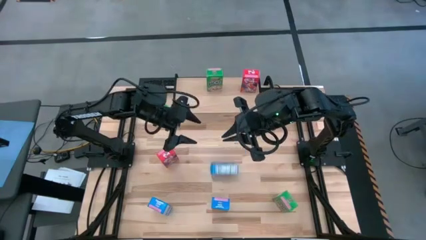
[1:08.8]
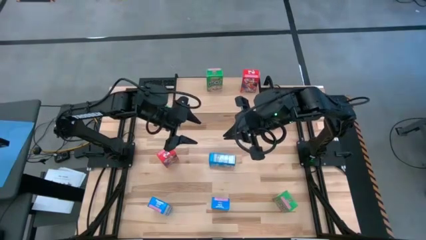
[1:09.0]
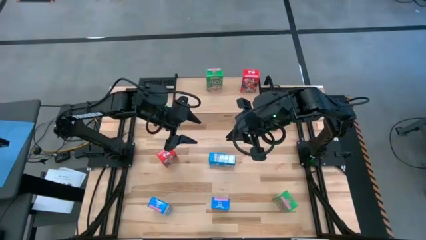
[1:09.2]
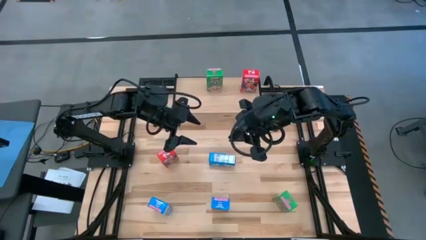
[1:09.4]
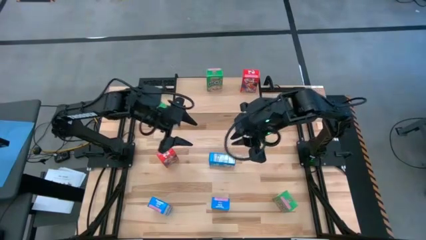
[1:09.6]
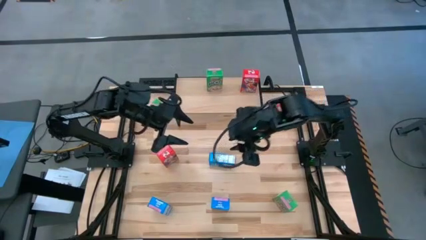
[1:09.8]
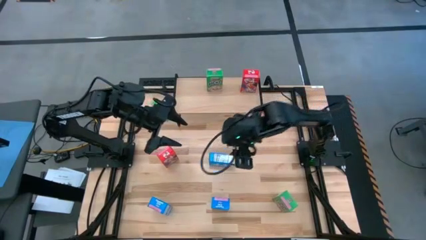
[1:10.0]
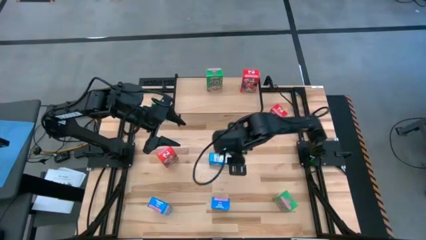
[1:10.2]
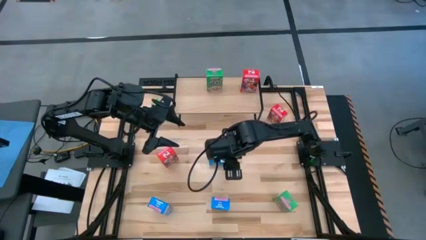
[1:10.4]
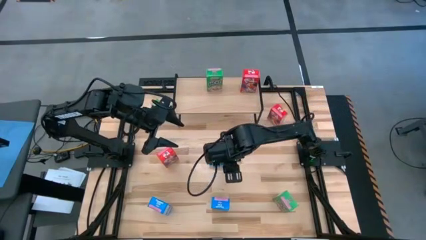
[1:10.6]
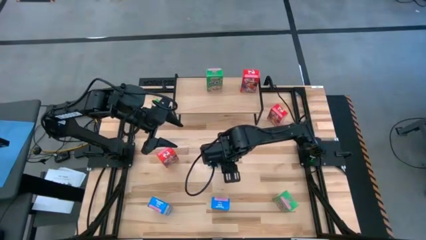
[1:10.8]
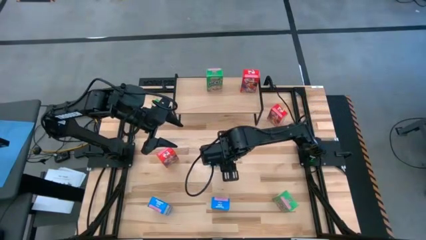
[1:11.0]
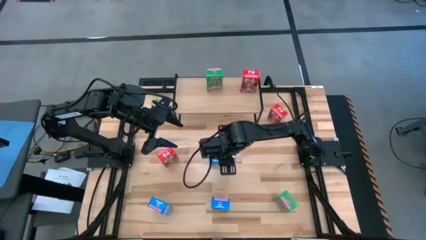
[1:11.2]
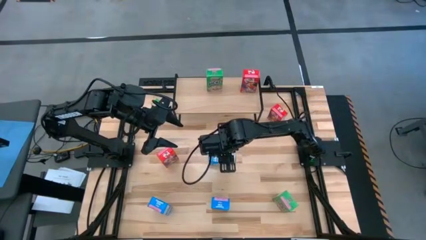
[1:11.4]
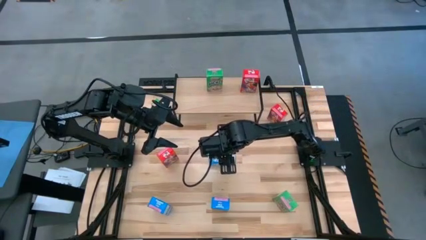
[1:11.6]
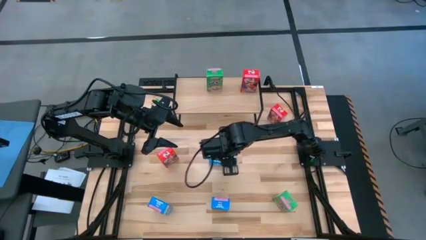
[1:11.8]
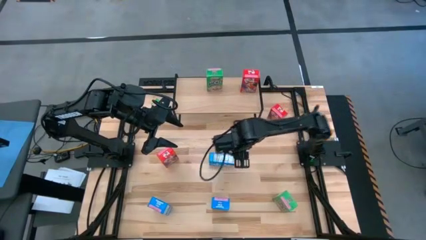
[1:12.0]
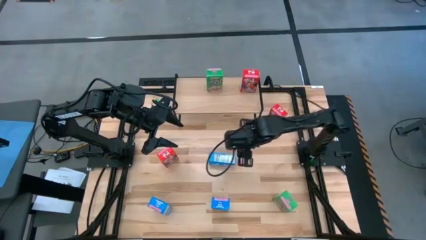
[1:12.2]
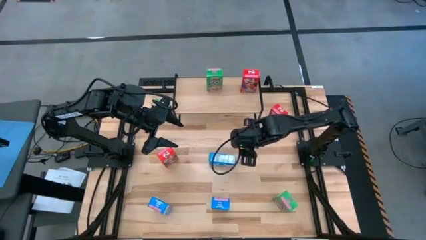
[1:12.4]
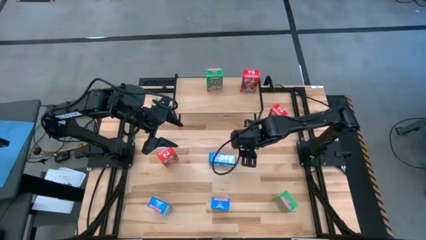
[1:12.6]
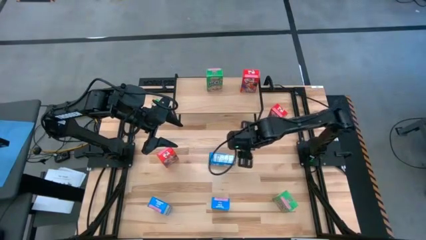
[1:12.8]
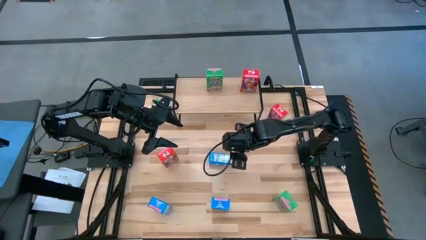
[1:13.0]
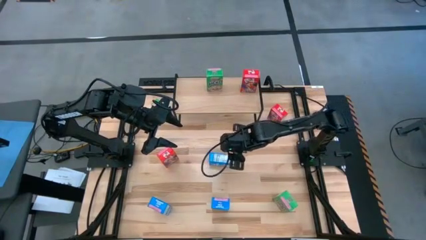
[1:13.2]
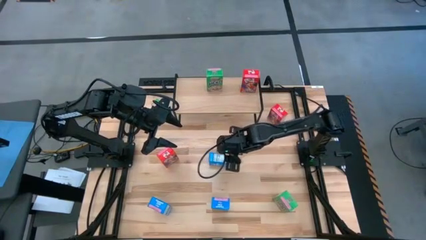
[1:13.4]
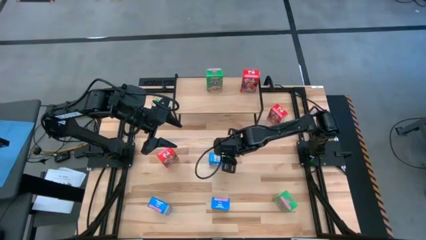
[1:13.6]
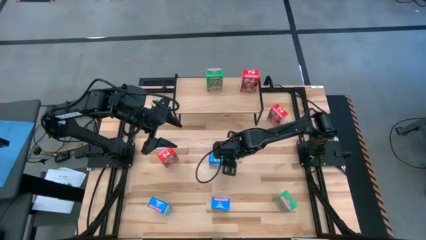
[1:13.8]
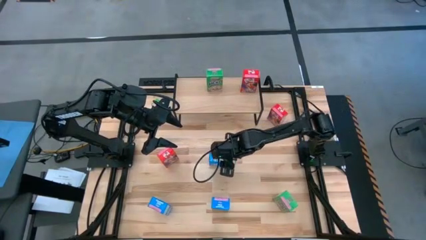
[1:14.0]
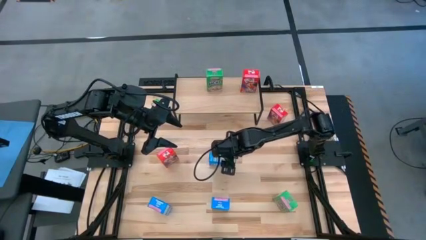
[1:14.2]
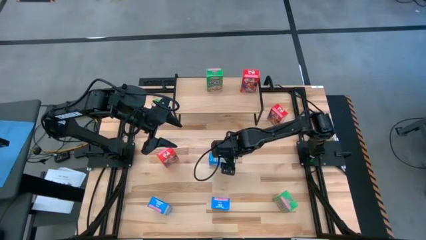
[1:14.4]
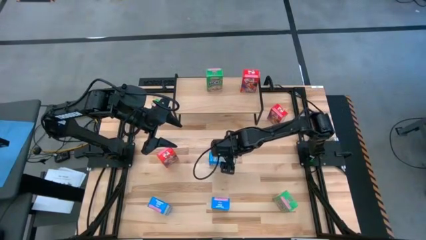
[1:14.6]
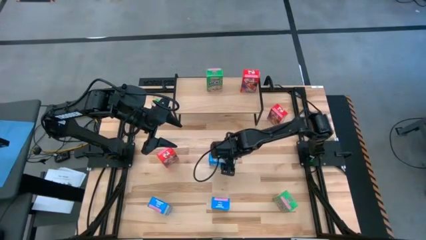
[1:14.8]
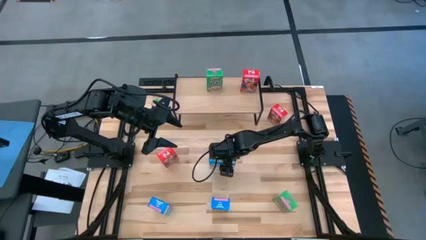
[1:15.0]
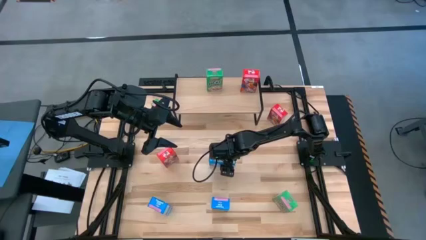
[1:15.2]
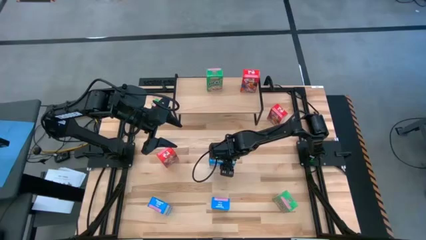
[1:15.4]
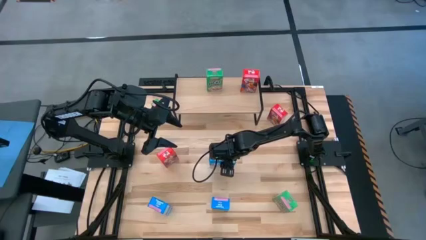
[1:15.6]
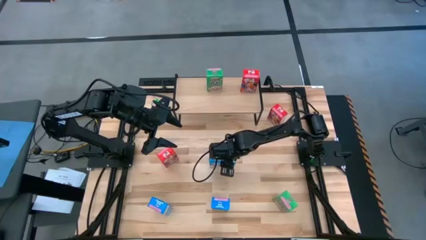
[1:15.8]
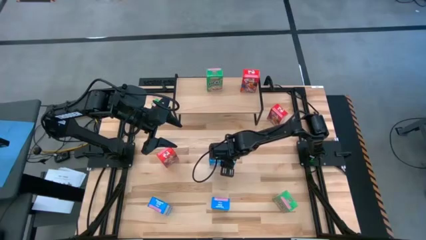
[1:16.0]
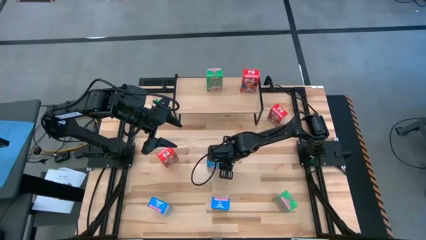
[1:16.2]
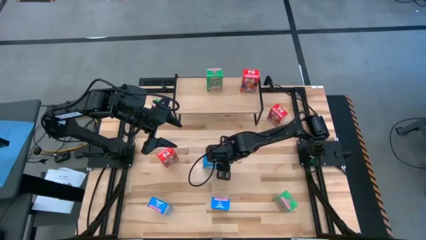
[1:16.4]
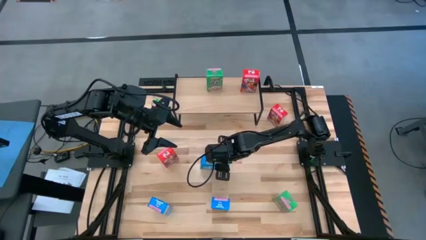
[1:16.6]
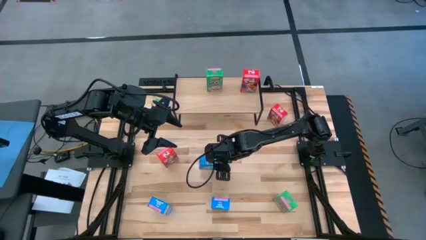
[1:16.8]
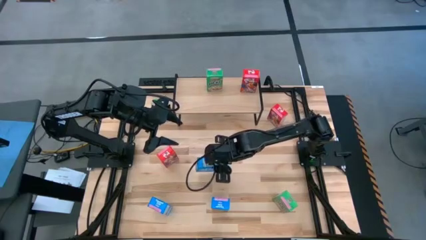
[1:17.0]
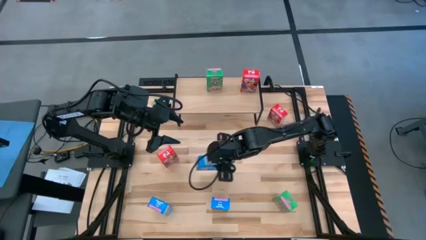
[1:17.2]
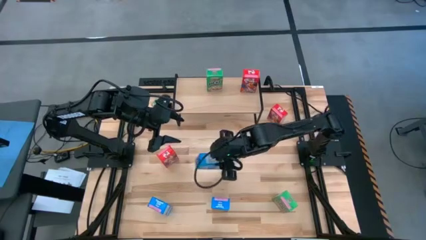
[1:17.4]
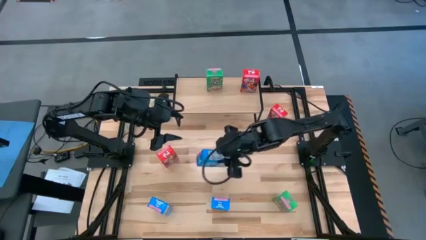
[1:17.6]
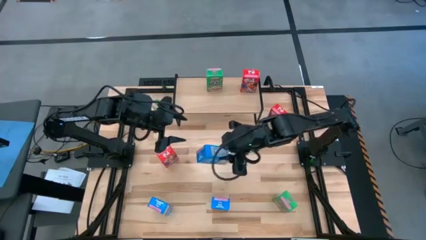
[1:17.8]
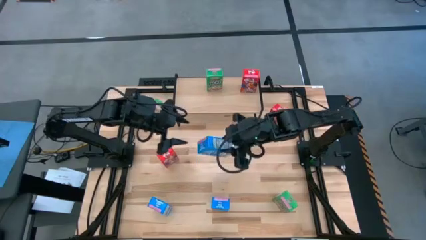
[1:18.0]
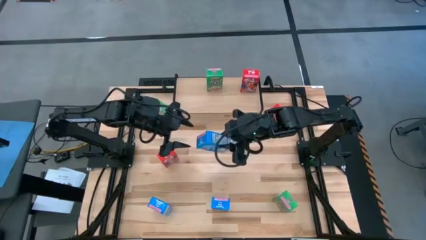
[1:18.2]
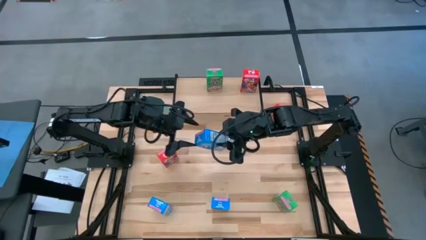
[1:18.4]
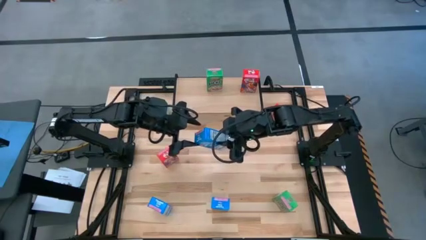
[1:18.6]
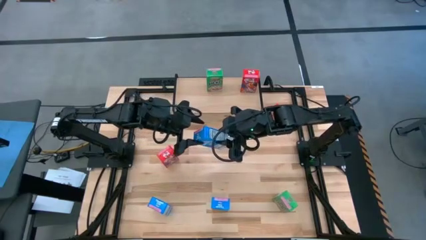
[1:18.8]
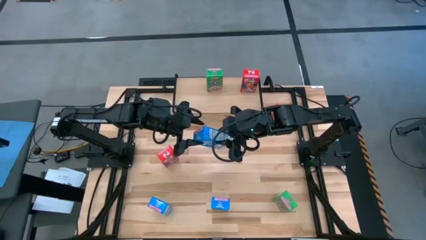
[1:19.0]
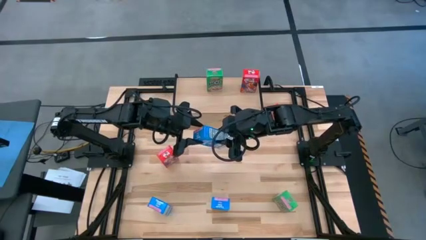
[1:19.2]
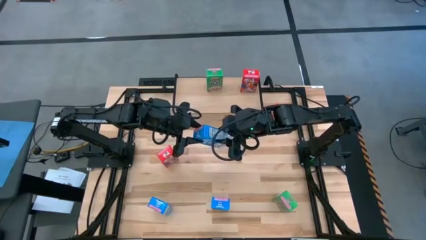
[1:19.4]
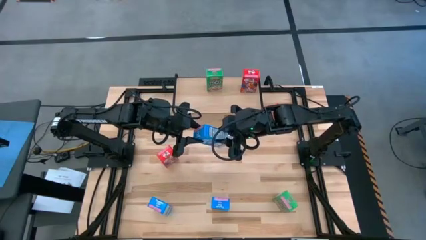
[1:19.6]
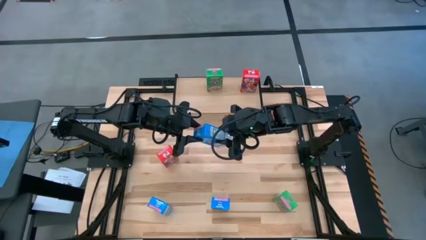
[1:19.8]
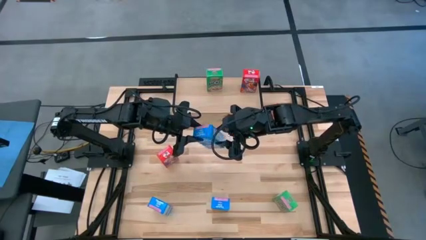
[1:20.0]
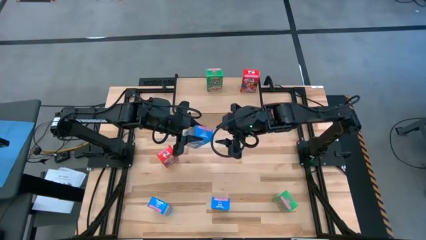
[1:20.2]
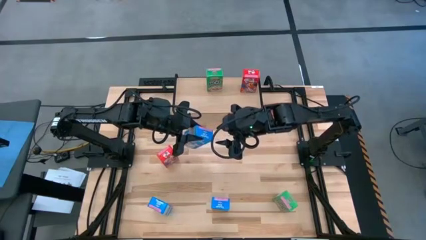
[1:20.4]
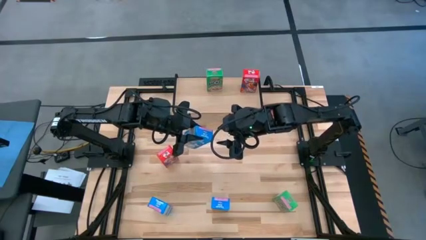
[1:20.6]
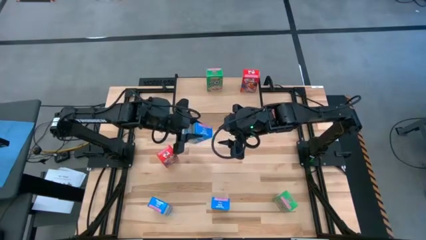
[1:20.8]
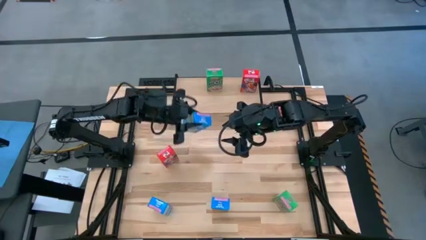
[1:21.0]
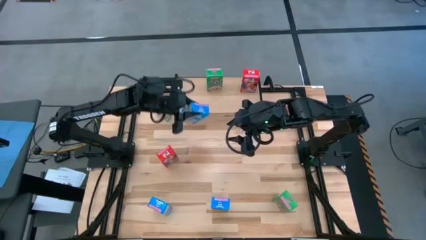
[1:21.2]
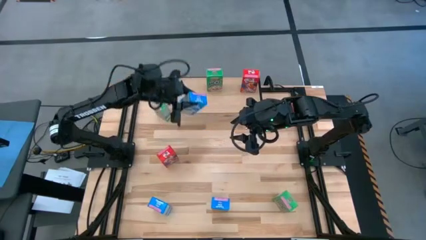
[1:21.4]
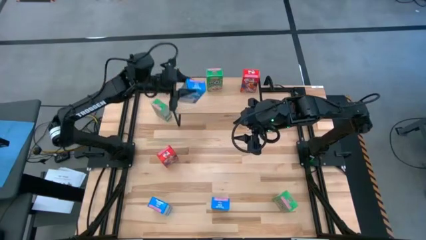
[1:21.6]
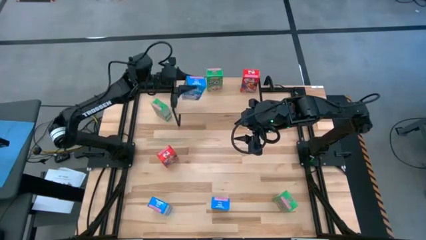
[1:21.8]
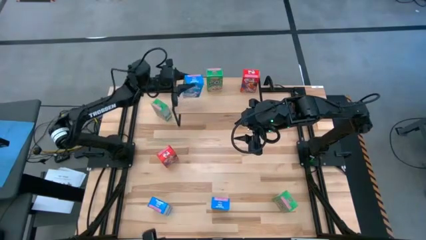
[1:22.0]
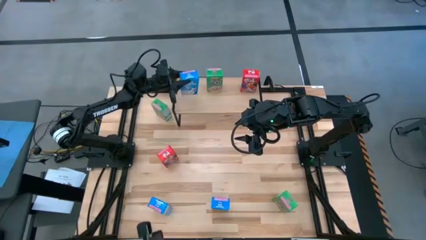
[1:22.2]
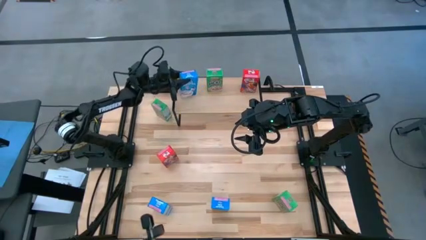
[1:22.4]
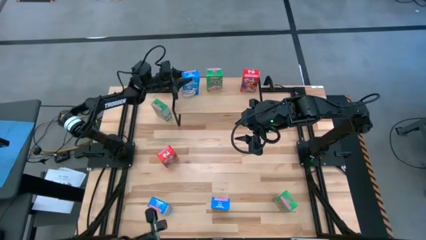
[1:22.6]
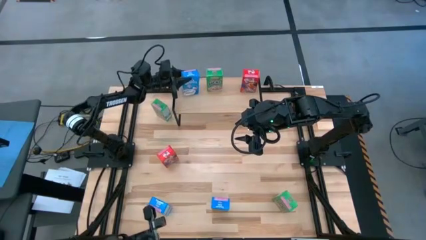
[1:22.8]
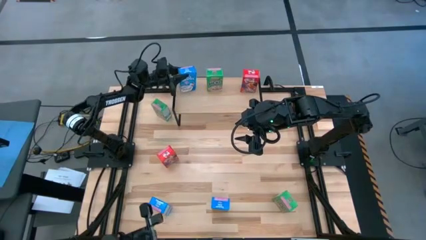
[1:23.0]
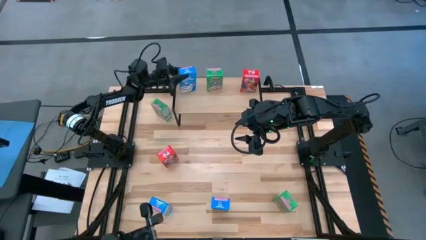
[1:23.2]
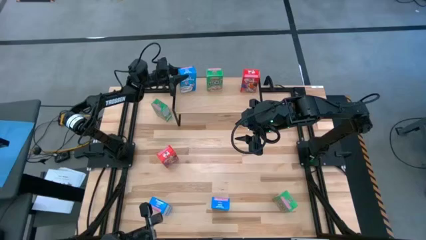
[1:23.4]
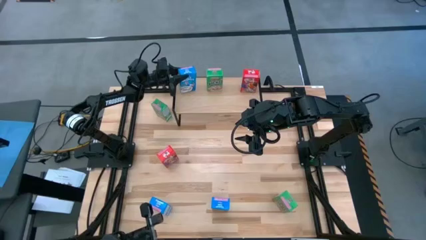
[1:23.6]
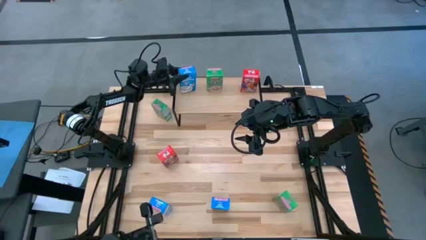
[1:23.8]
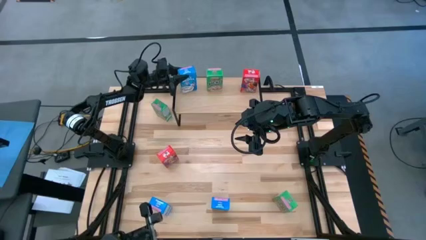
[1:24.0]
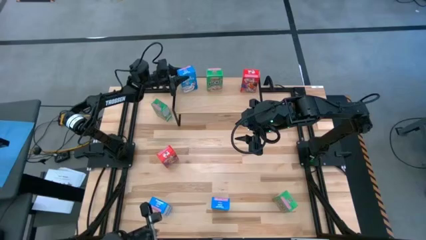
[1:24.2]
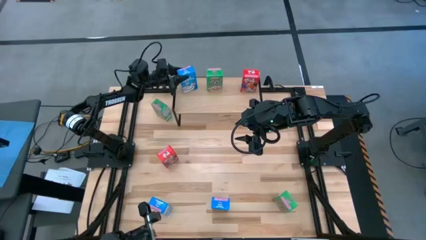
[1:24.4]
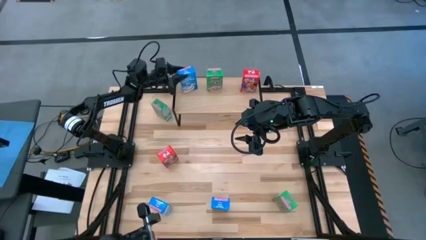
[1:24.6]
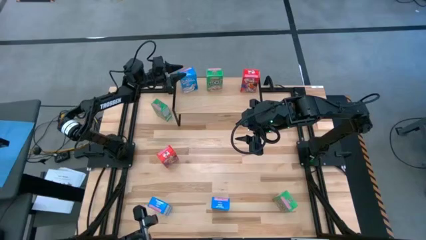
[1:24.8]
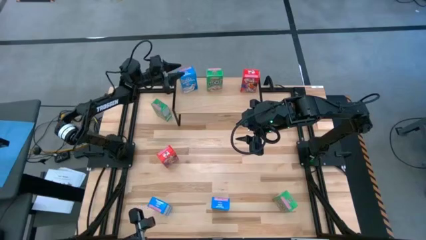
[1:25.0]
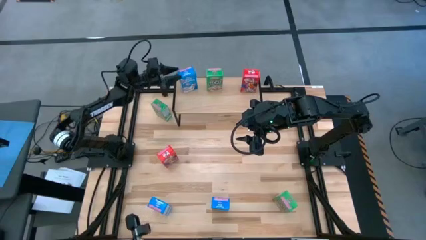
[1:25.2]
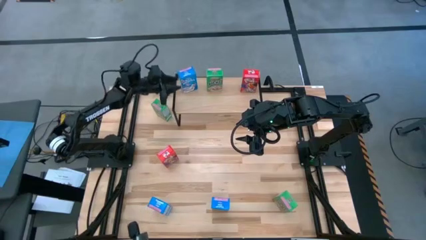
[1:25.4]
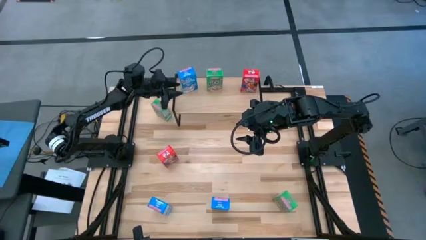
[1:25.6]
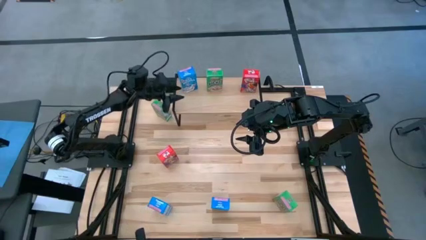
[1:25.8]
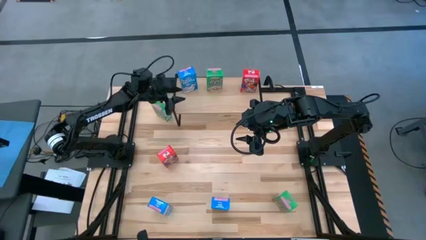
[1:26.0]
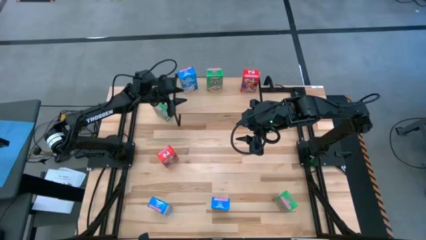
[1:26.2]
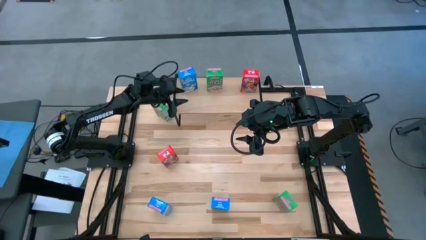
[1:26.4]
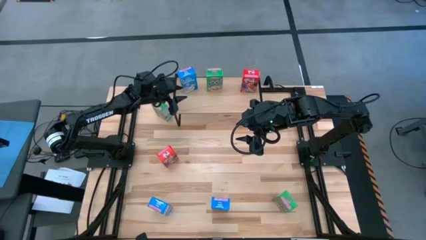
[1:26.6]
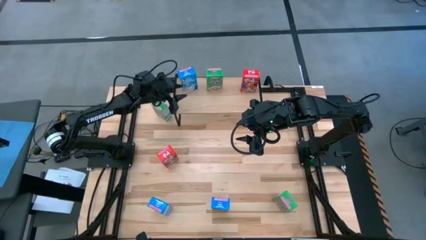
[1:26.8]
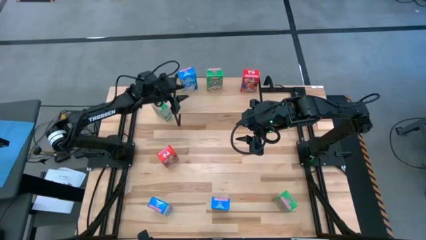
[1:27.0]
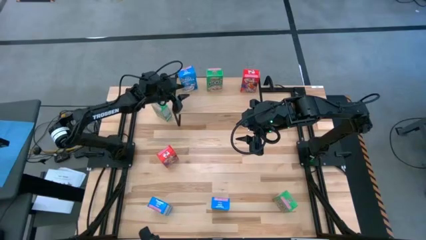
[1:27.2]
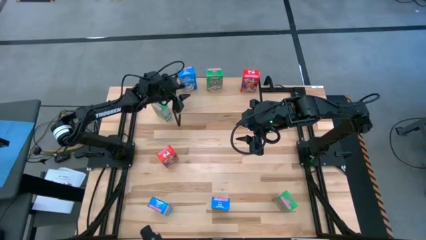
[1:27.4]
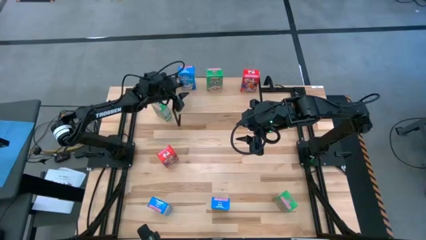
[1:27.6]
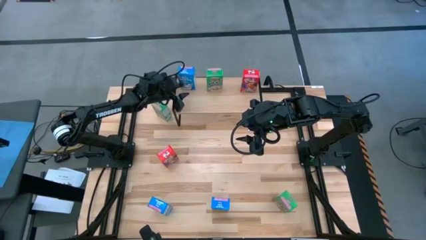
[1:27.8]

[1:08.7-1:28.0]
Task: Stack cereal on shelf
Put the top right blue cereal box on the shelf
